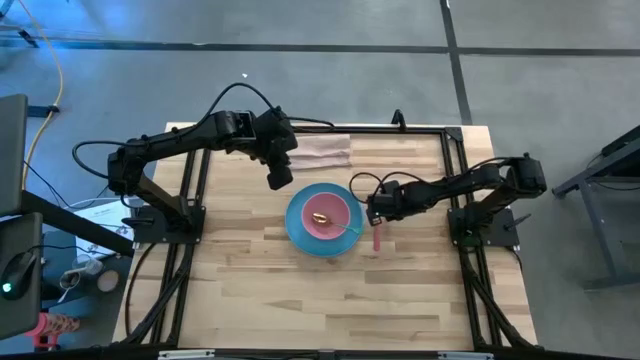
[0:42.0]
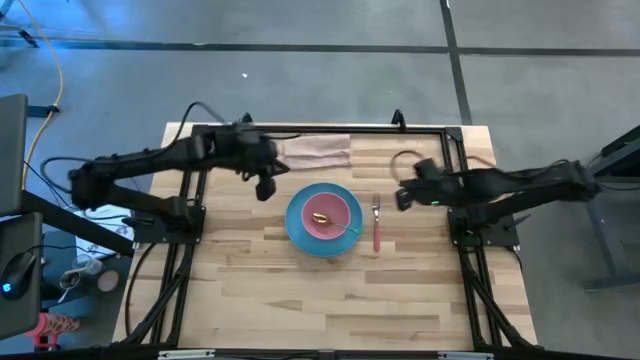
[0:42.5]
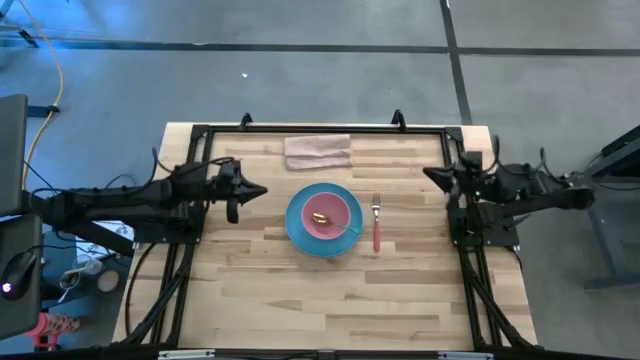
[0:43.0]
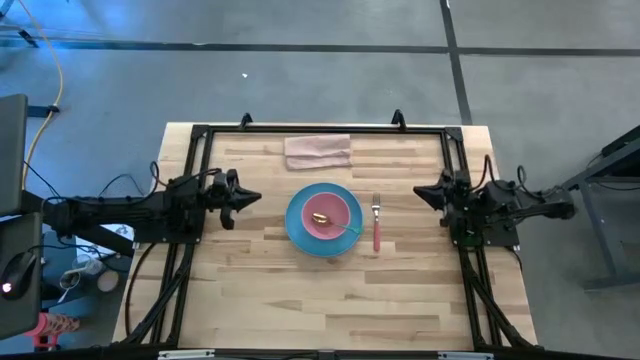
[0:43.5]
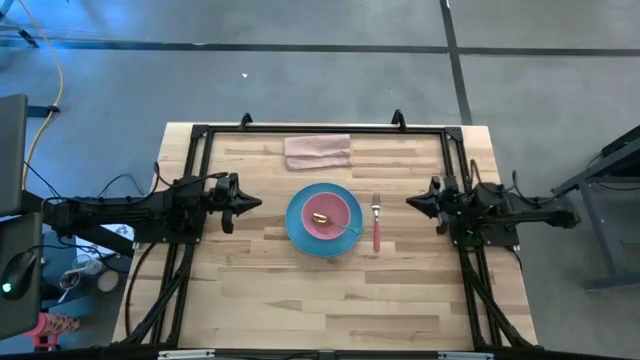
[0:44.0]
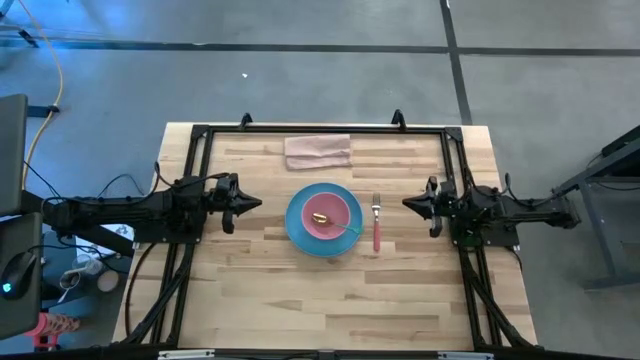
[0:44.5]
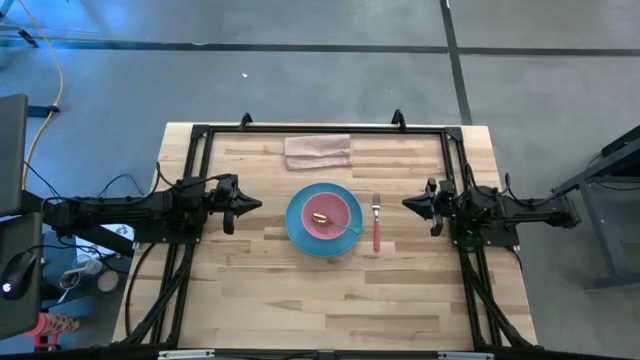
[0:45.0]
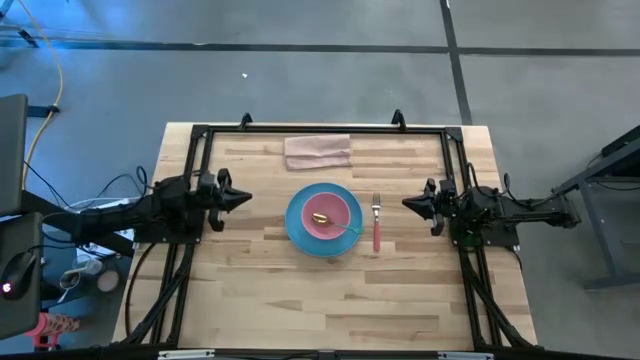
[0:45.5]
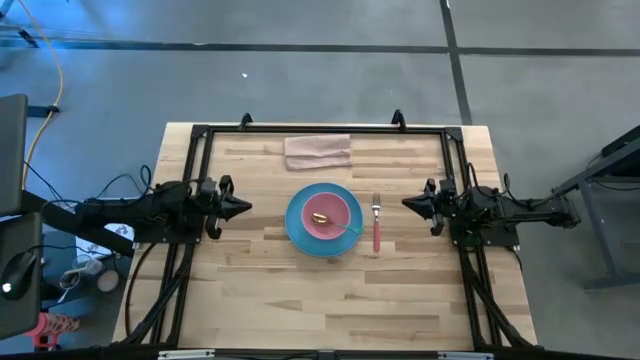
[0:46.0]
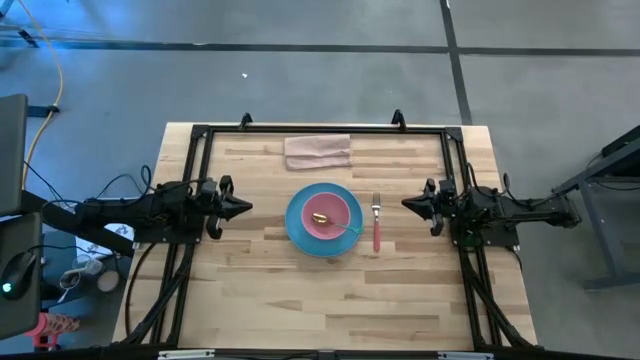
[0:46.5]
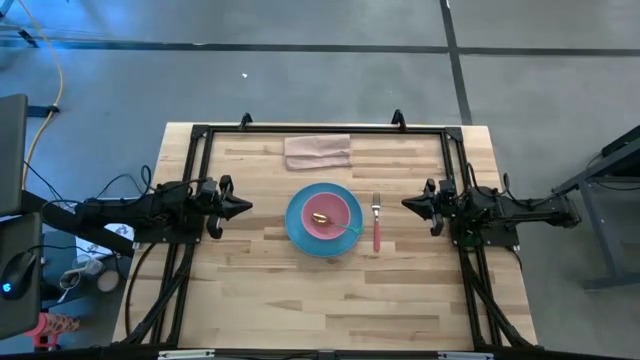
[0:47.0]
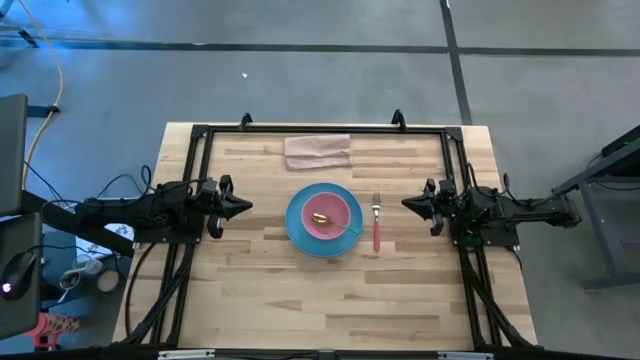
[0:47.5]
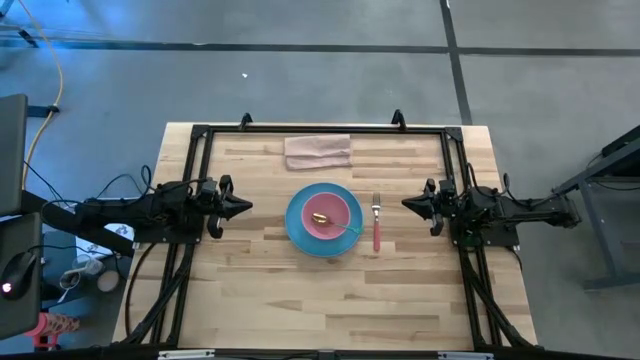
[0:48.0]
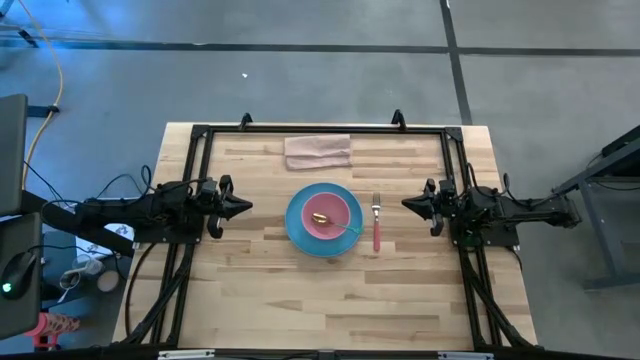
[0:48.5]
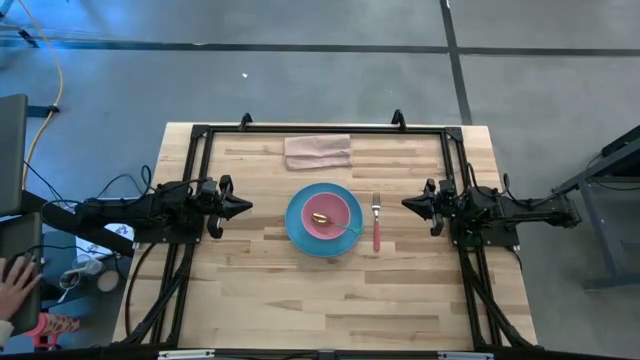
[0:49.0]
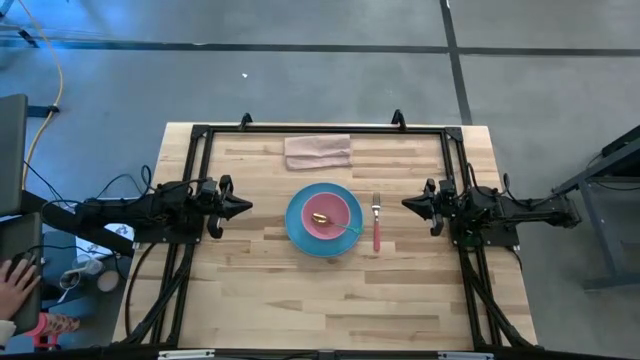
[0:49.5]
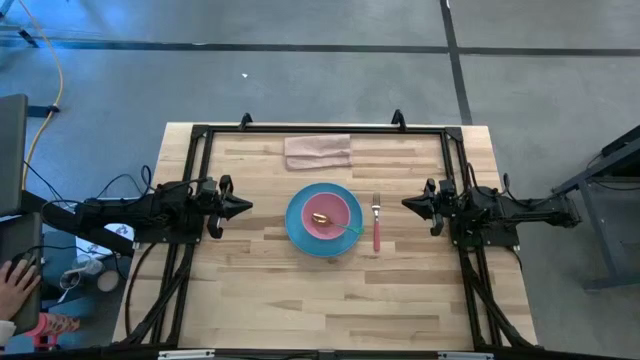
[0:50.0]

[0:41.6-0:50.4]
Task: Set table place
Return to Home Position

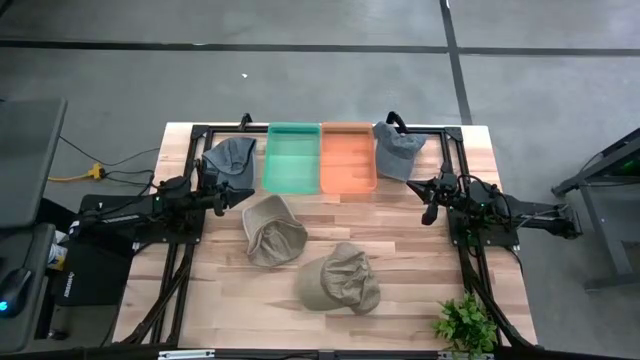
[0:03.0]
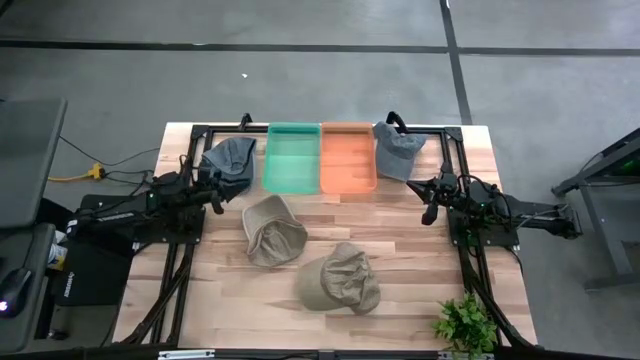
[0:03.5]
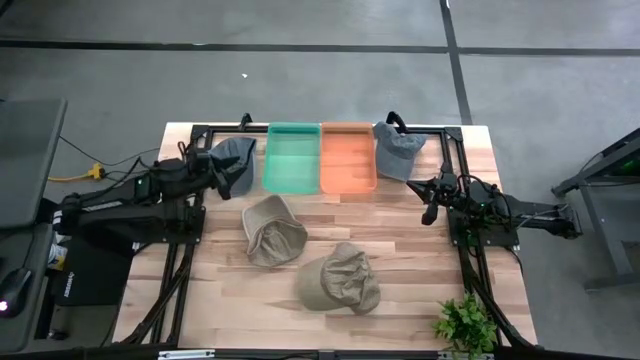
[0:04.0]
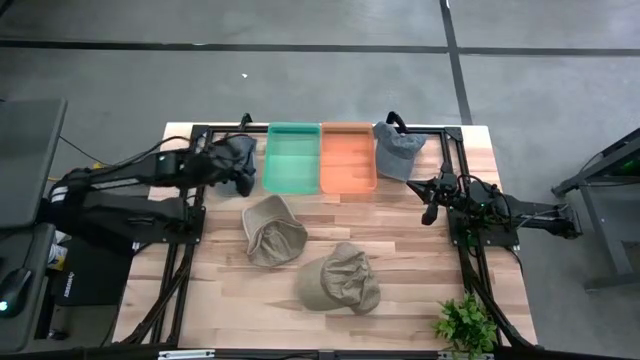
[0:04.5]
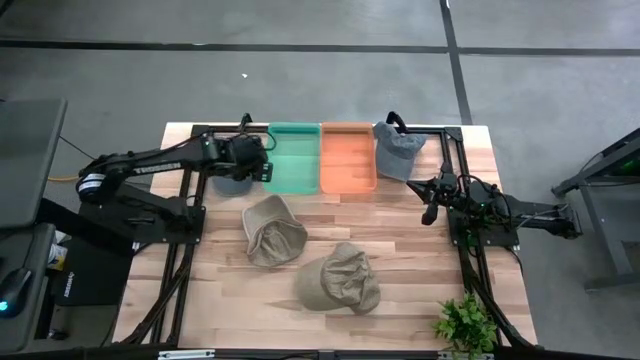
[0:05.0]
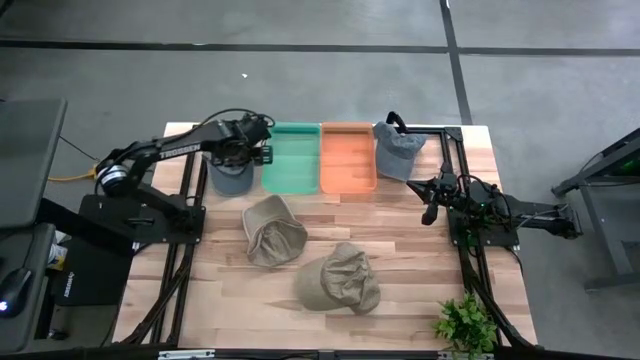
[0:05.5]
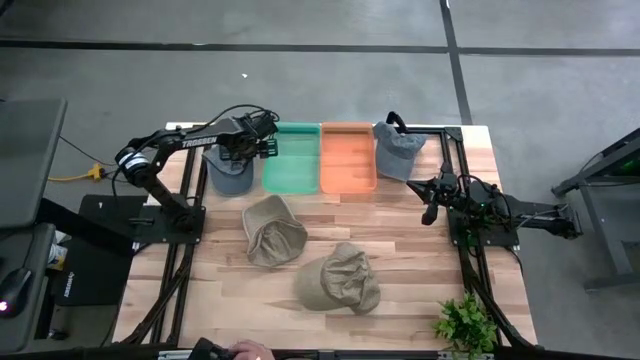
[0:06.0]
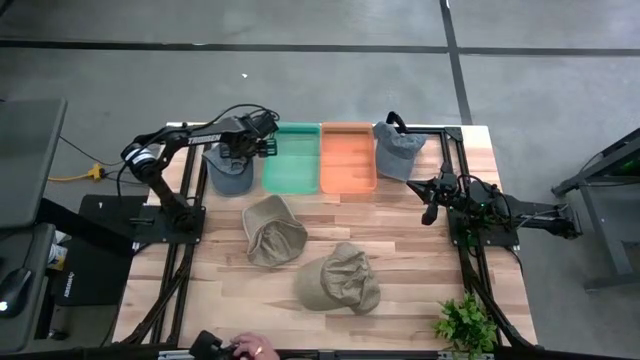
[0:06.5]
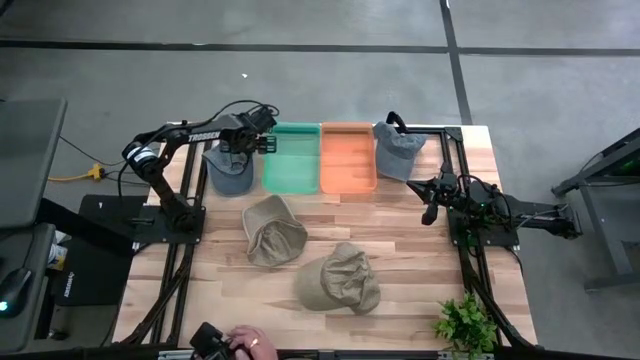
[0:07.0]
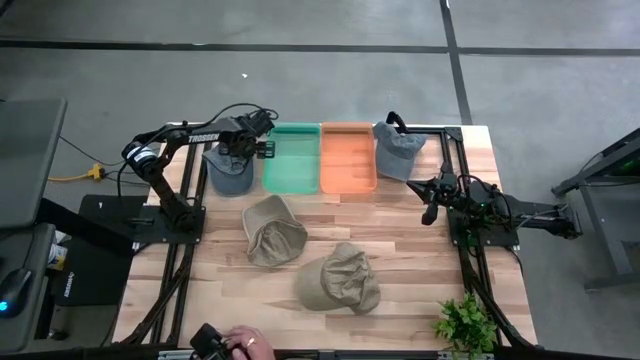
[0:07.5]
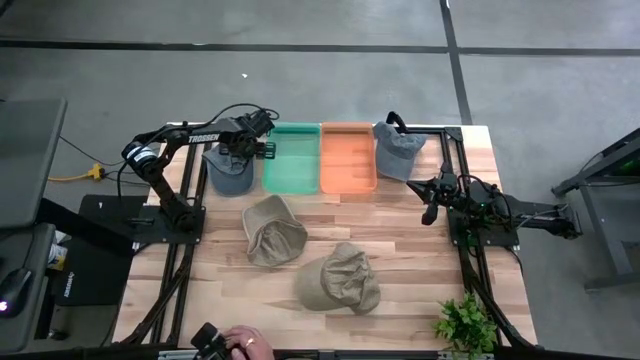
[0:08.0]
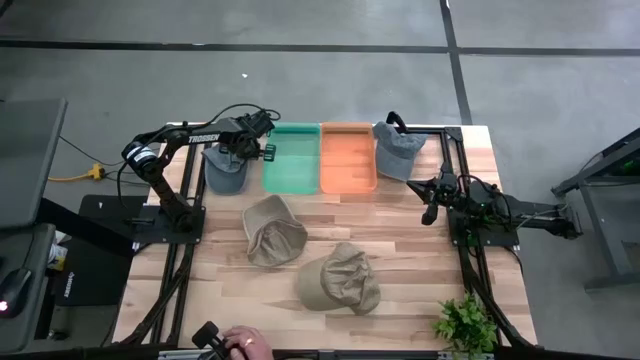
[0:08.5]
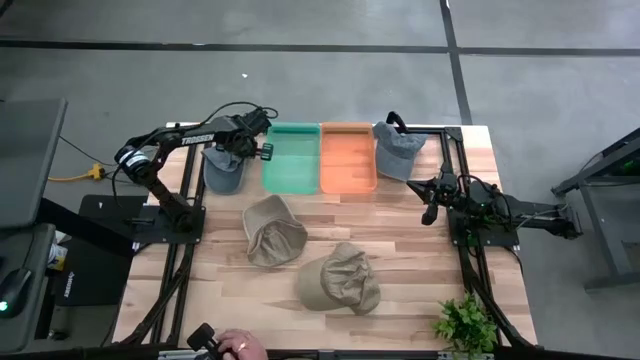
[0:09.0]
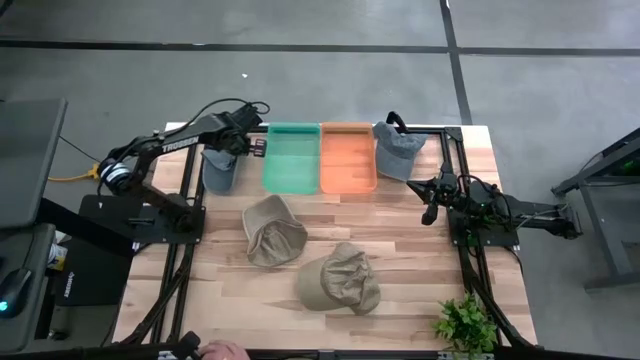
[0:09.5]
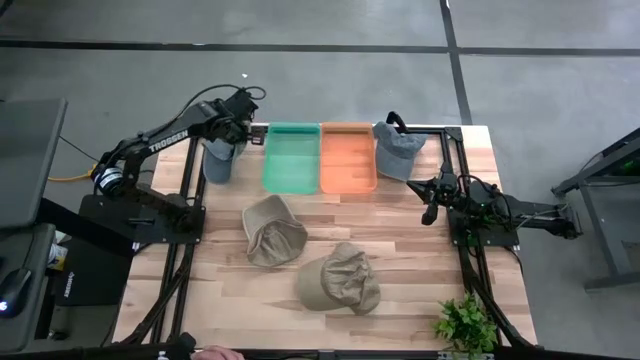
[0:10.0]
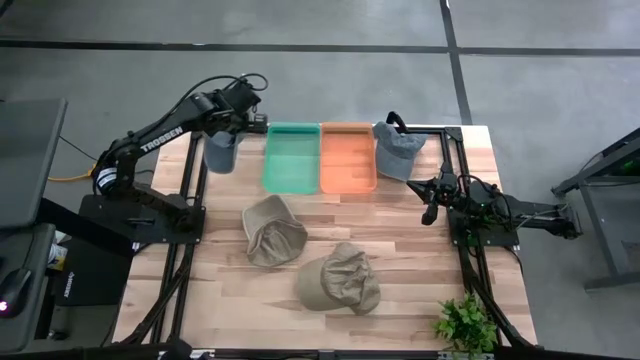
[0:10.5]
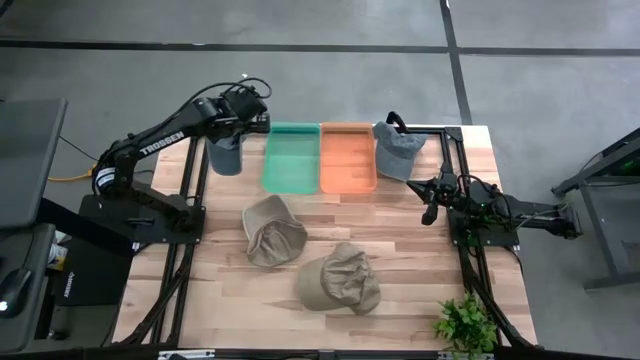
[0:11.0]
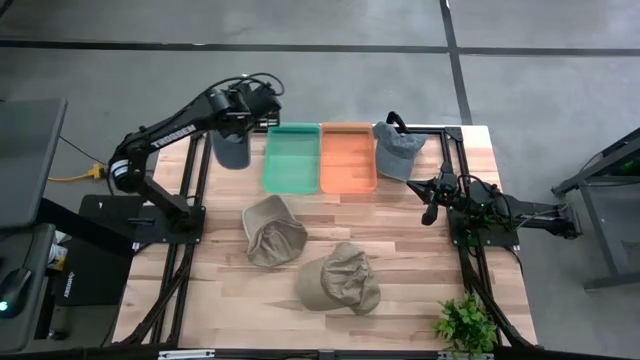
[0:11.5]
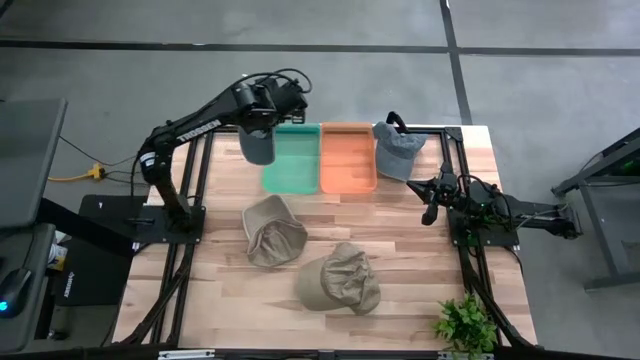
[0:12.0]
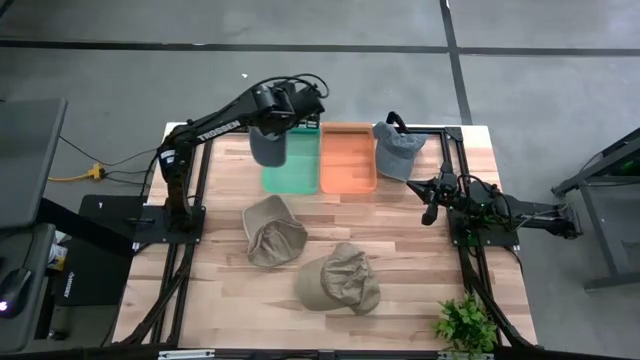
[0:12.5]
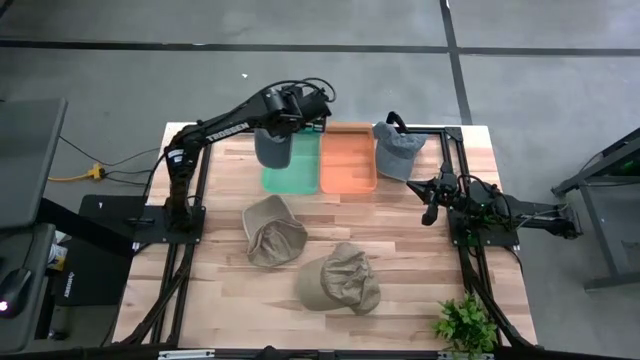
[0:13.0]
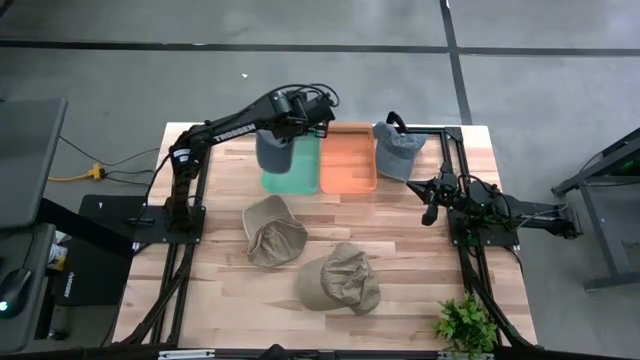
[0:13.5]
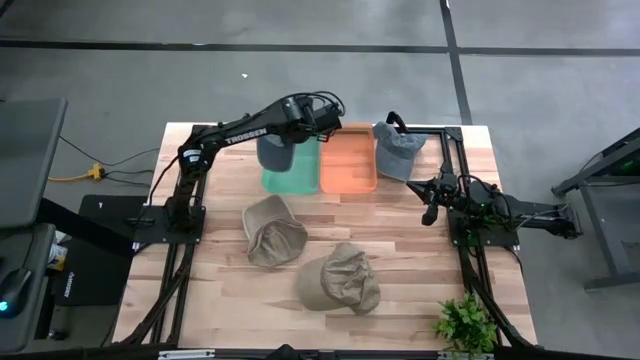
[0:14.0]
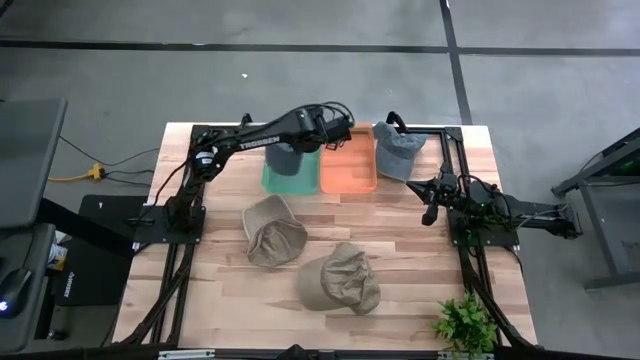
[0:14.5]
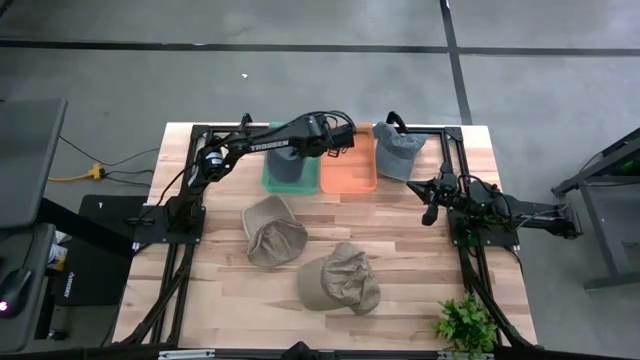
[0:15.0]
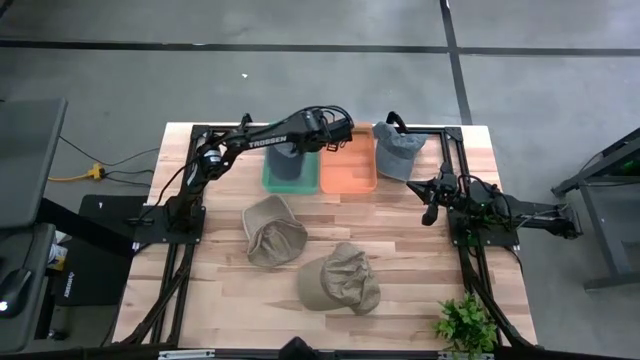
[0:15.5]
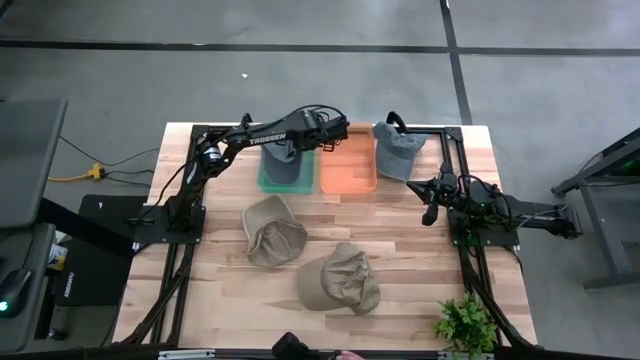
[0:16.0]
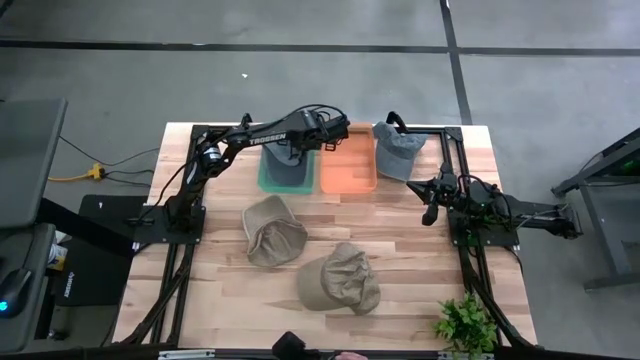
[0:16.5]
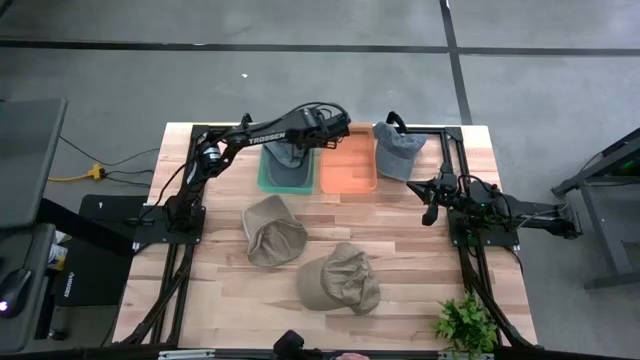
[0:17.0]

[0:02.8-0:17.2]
Task: Pick & Place hat
Put the left blue cap into the green bin
